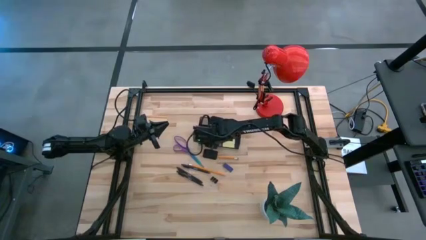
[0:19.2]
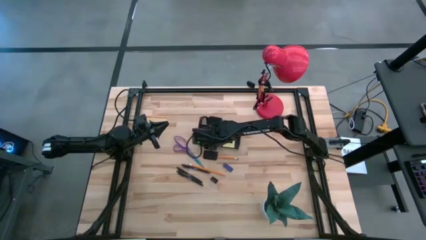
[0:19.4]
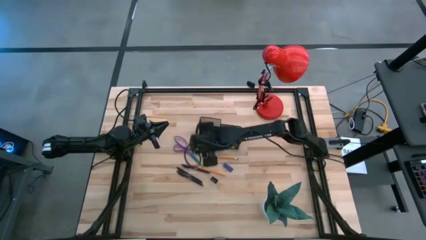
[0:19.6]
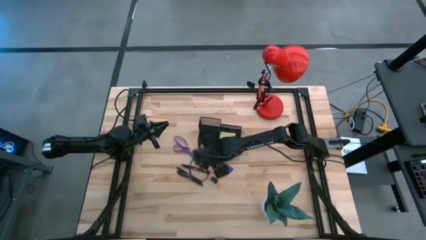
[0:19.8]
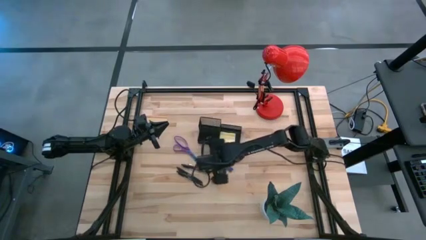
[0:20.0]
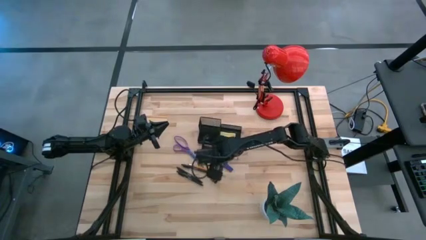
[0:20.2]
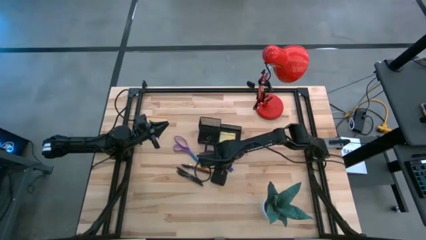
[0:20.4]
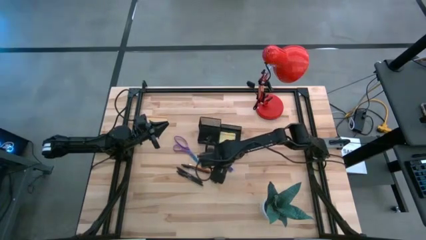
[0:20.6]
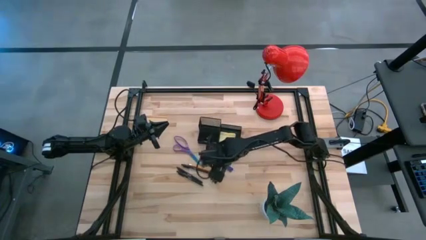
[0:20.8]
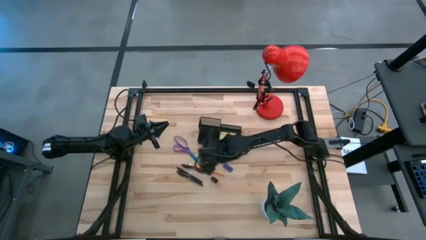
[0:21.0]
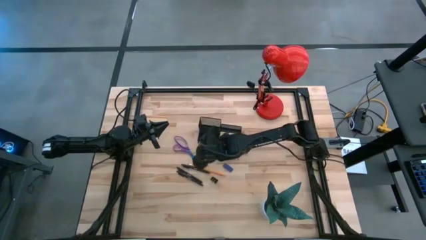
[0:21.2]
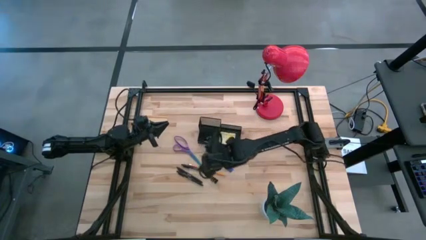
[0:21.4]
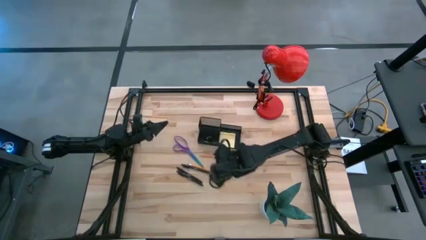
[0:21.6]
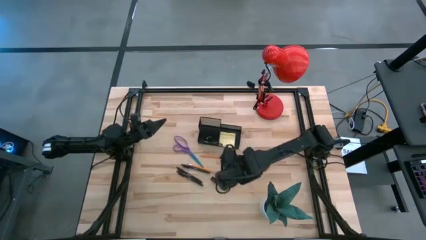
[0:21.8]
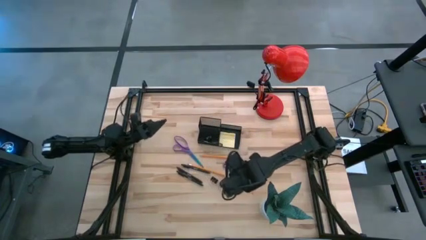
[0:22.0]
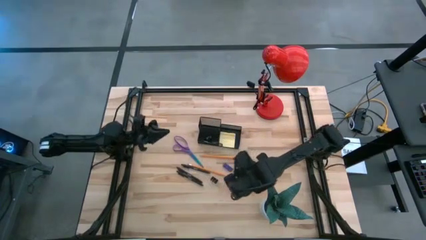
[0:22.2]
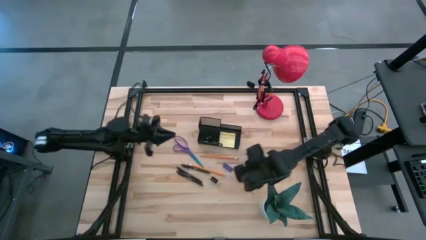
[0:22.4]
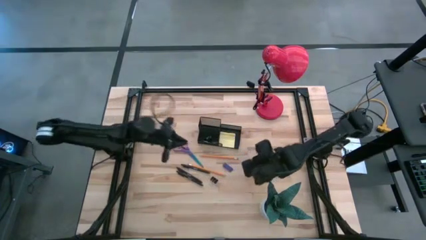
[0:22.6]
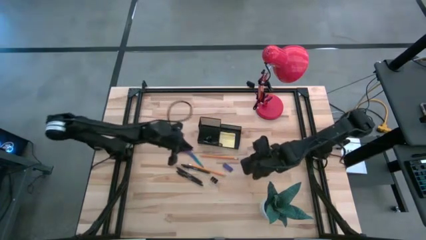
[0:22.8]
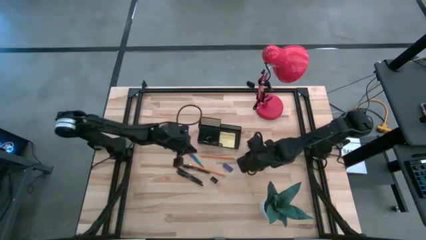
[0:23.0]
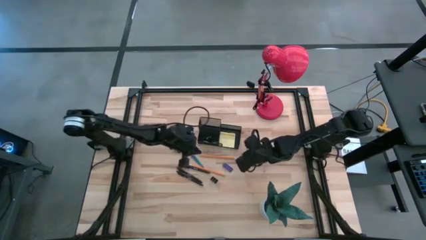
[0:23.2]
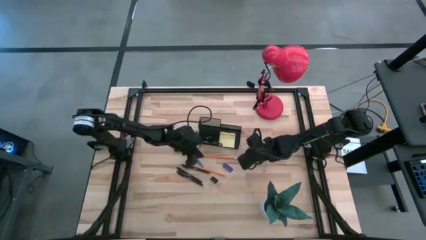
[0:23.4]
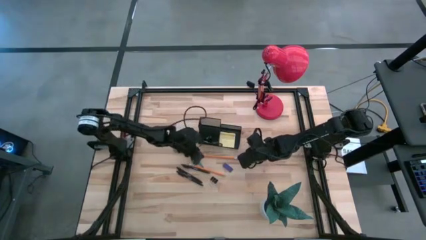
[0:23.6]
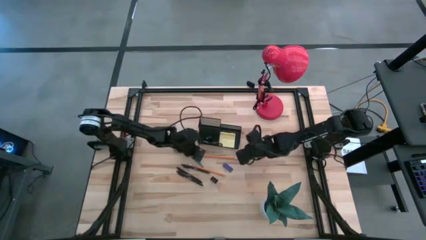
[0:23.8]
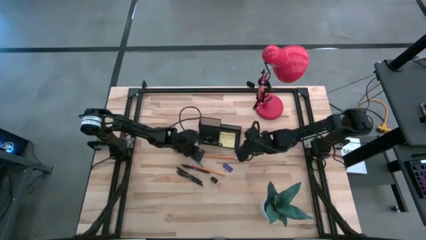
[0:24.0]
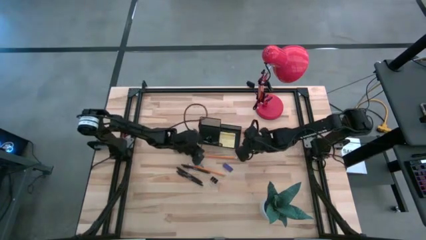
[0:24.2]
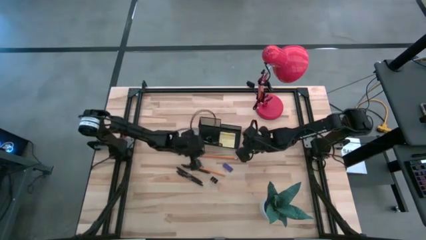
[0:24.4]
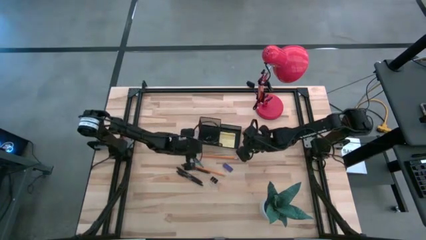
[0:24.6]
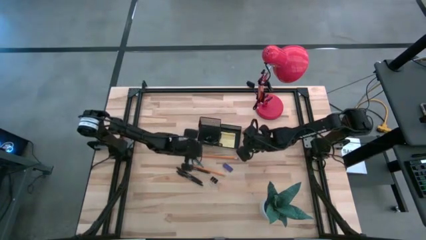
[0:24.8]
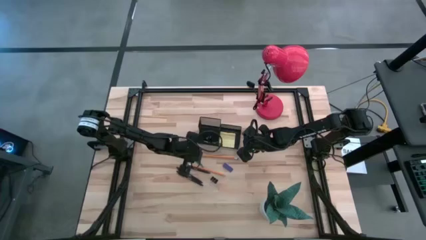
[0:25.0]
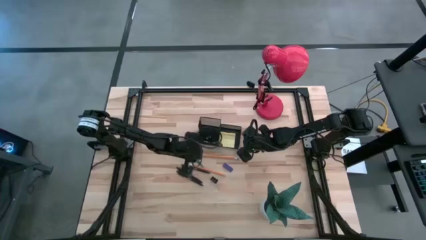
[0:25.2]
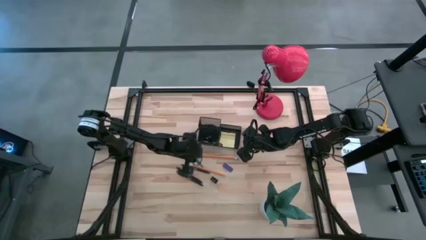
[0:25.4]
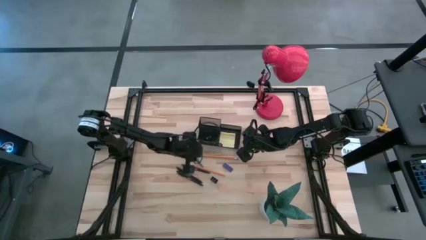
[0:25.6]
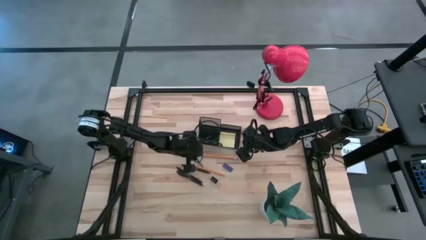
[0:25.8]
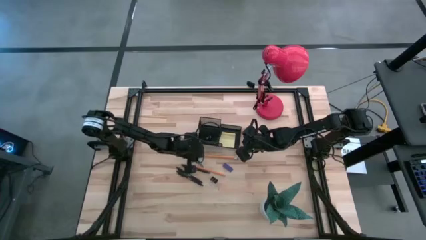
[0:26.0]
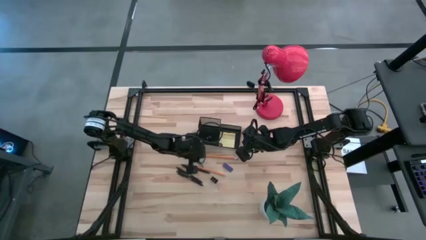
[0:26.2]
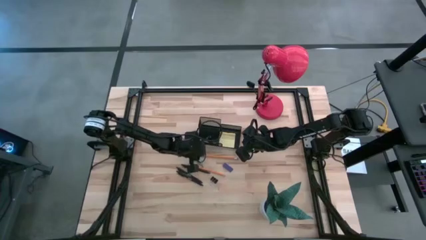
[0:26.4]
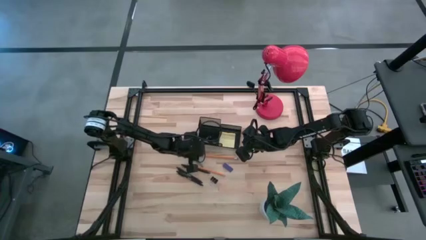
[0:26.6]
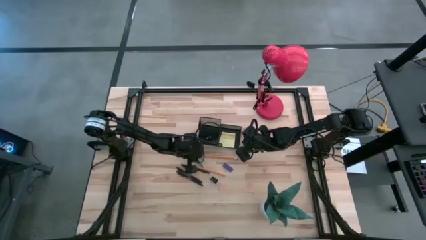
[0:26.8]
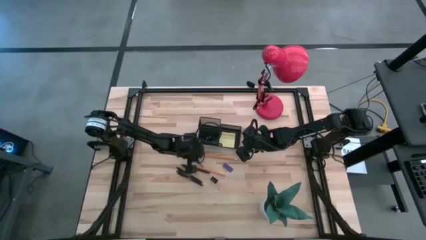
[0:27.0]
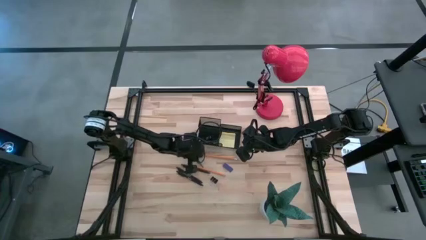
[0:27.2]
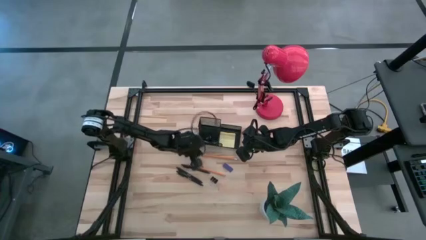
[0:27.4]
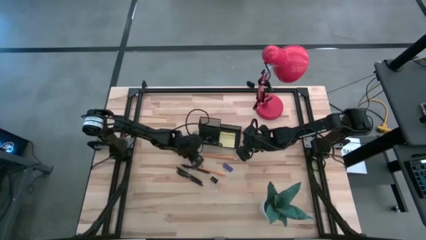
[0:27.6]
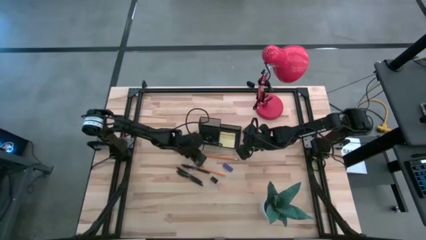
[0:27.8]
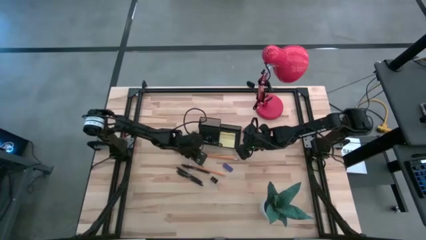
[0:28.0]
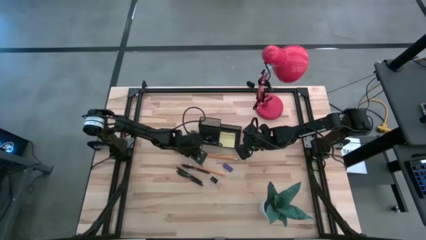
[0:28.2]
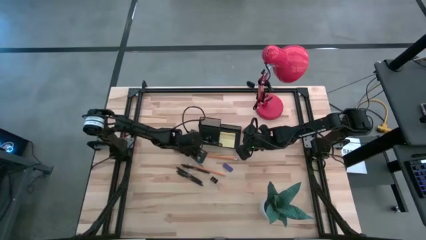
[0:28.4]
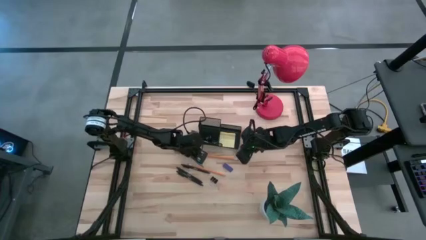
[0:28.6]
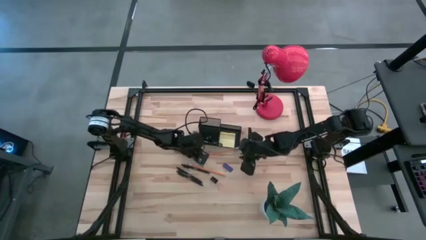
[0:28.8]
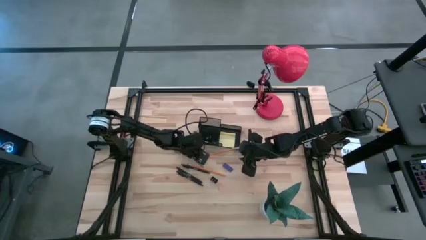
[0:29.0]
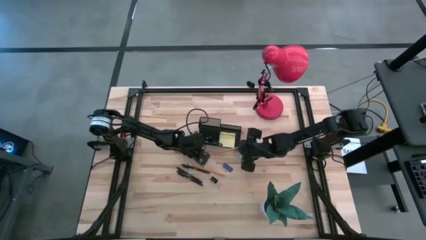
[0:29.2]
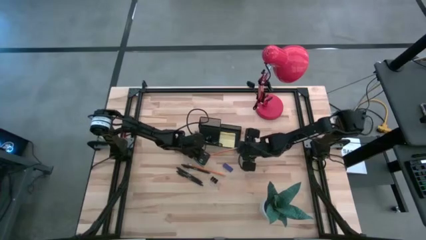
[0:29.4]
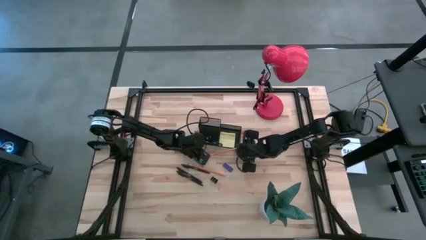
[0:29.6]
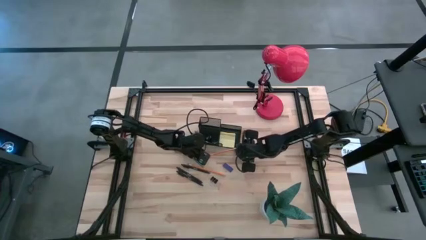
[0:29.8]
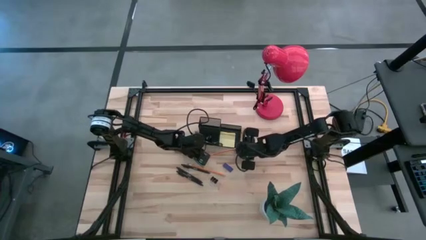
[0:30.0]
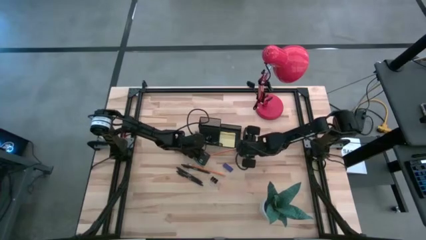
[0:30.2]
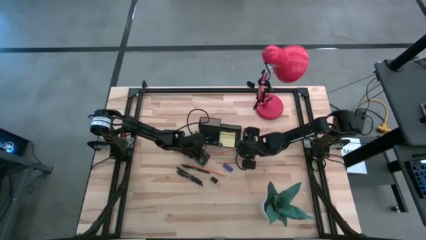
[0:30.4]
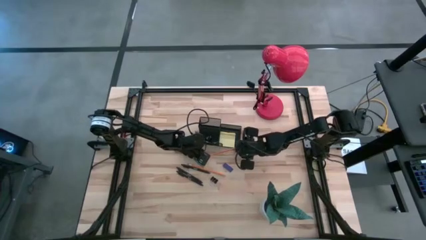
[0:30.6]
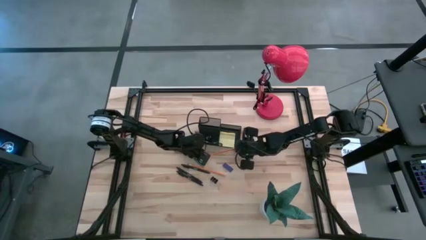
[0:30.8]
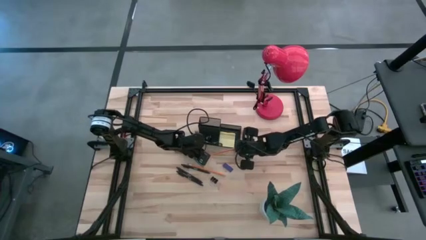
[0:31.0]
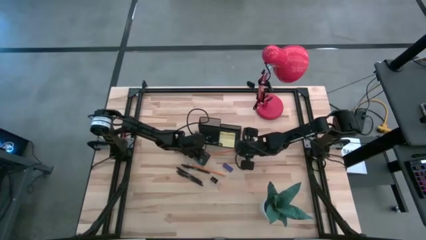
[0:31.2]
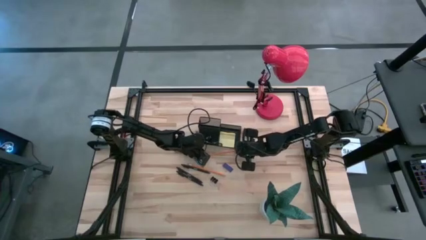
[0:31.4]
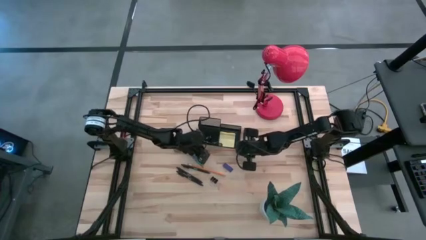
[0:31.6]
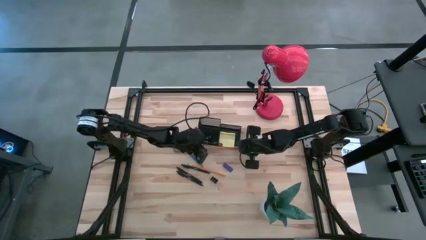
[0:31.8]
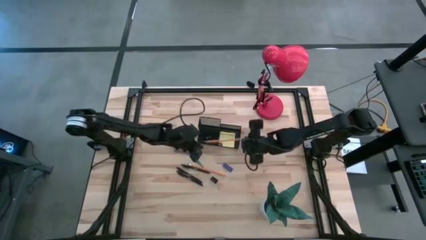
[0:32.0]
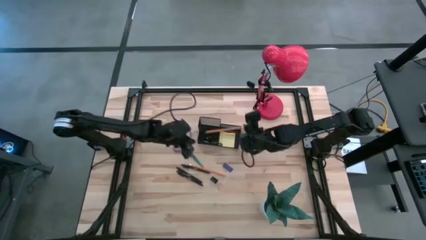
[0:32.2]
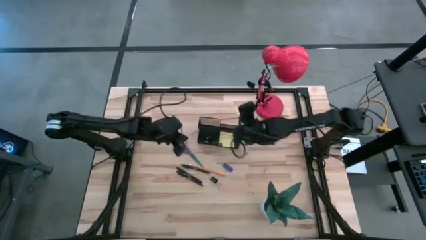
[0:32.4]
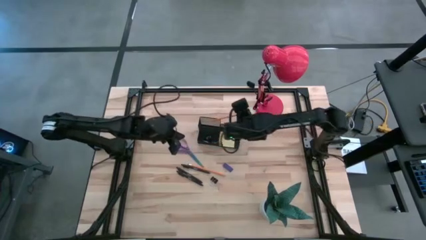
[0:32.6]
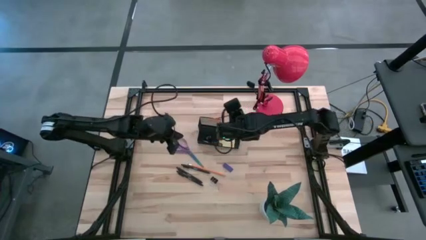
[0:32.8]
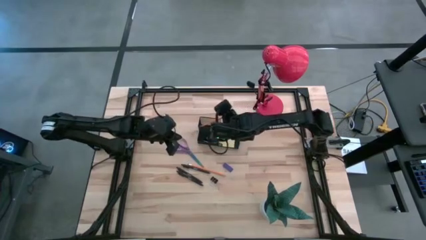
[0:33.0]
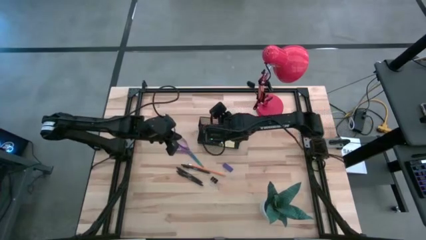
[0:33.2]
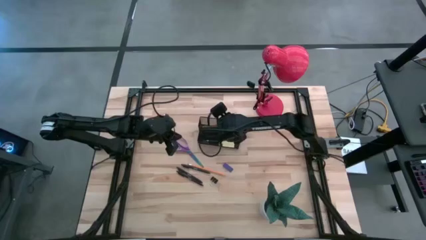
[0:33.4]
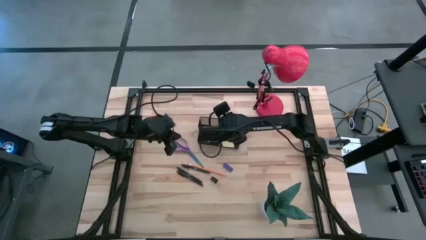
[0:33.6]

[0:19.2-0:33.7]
Task: Pick and place office supplies into organizer
Put the top orange pencil into the black desk organizer
